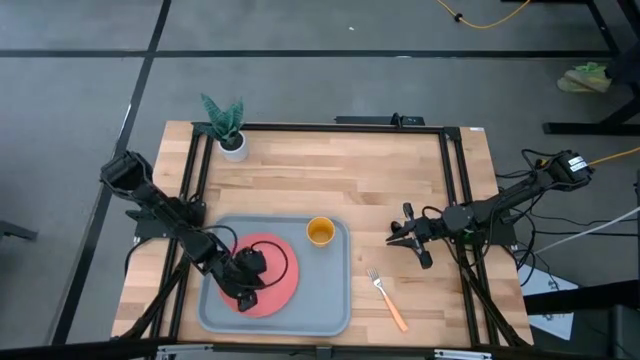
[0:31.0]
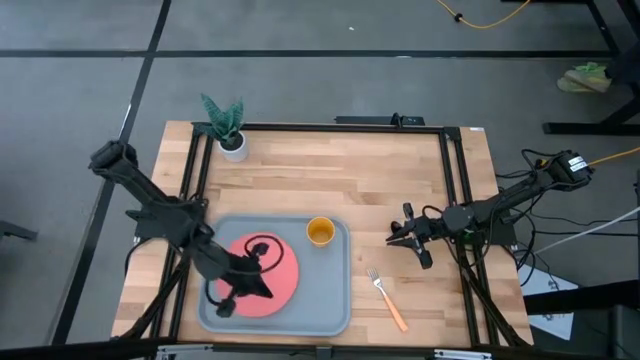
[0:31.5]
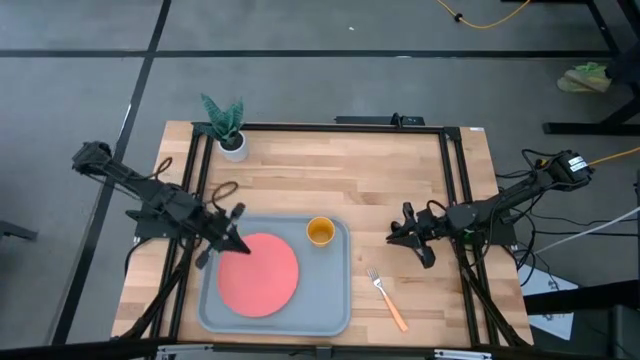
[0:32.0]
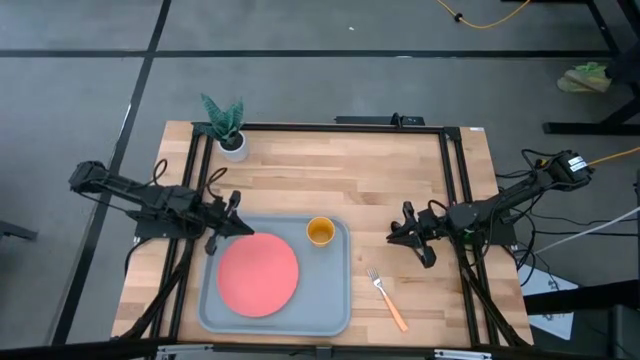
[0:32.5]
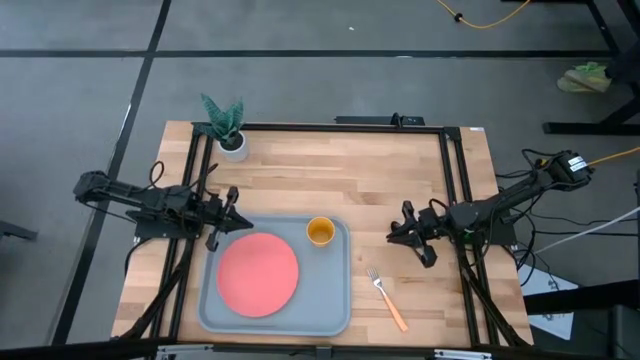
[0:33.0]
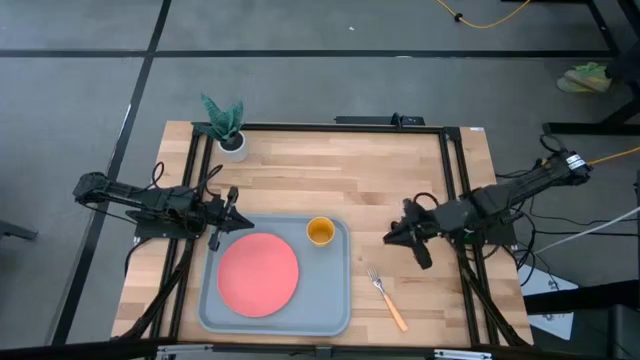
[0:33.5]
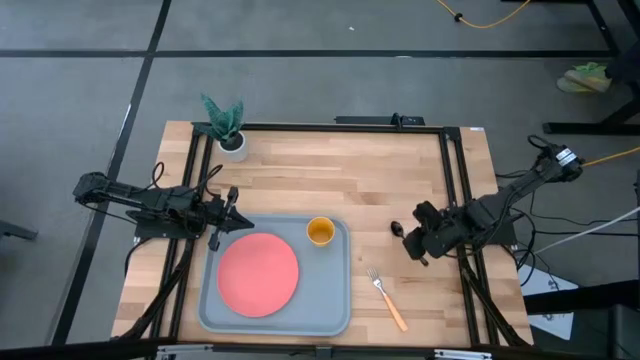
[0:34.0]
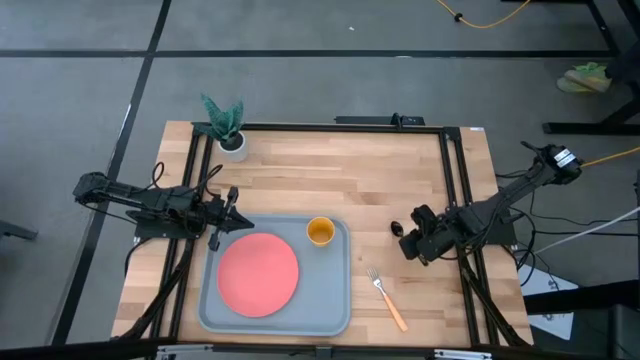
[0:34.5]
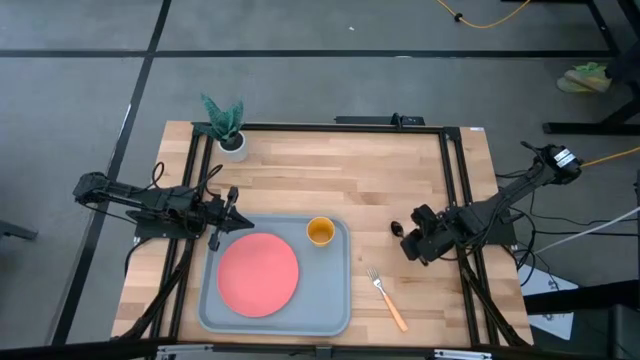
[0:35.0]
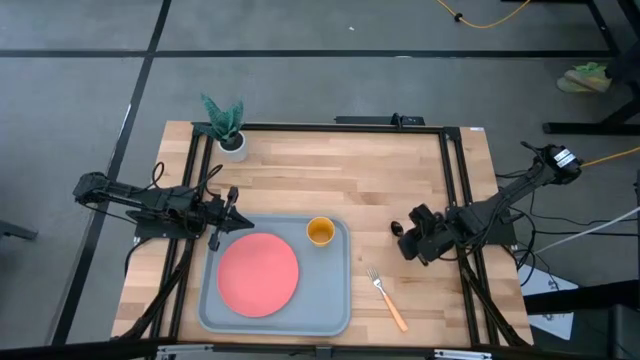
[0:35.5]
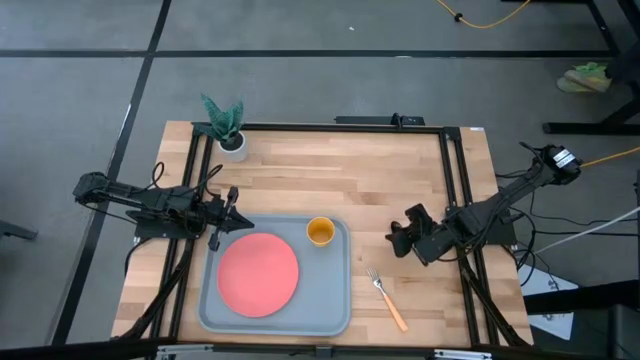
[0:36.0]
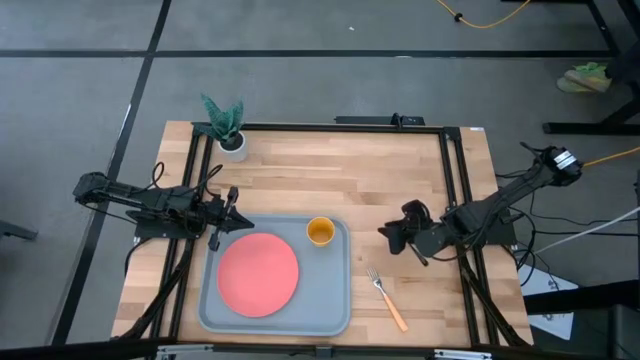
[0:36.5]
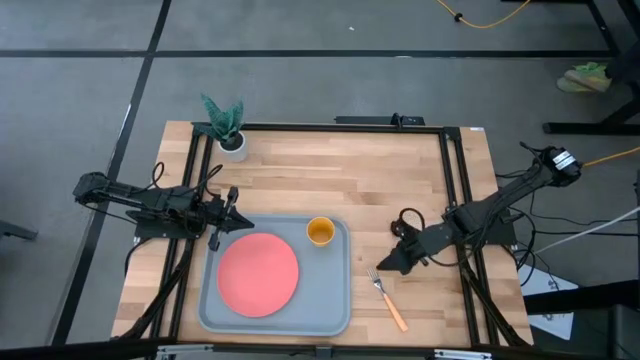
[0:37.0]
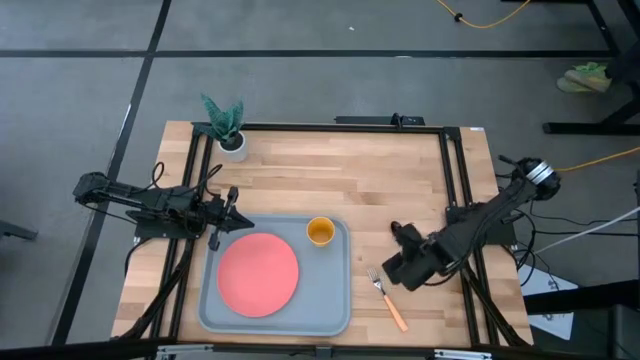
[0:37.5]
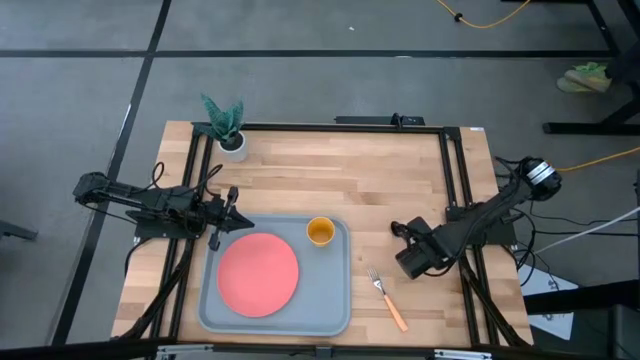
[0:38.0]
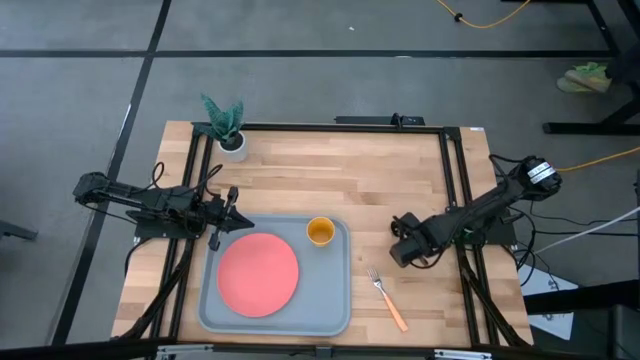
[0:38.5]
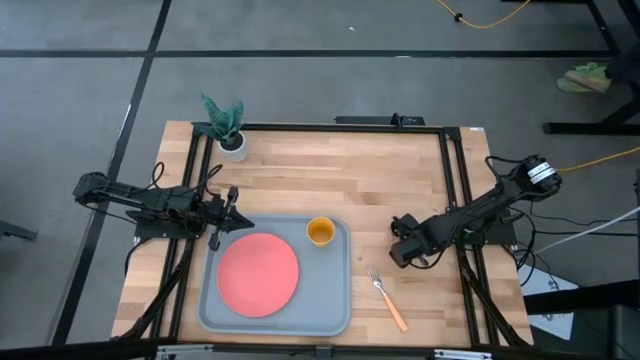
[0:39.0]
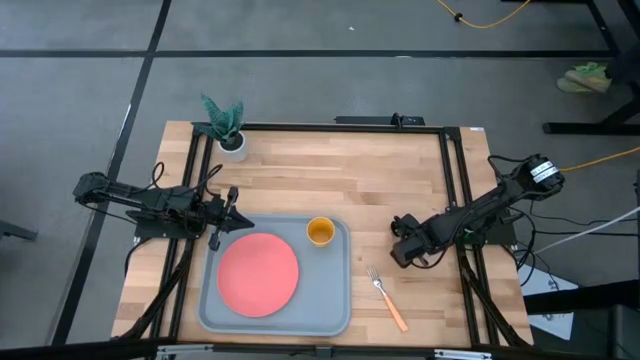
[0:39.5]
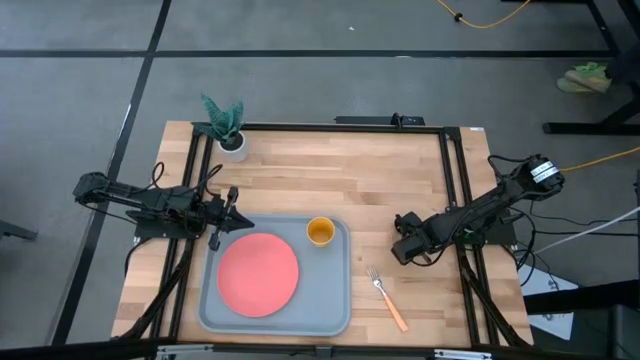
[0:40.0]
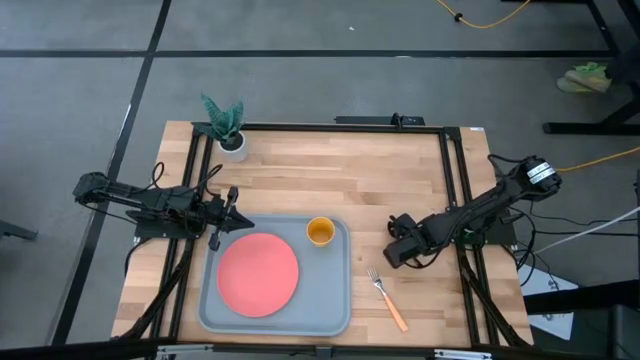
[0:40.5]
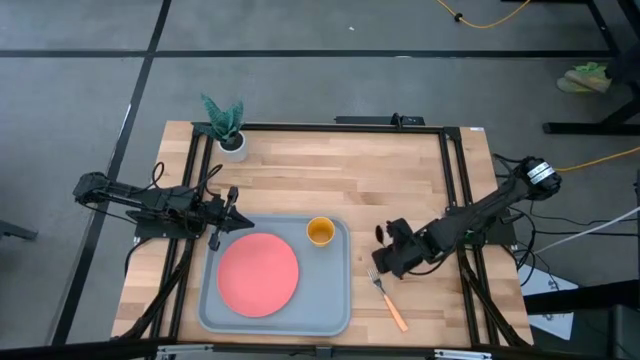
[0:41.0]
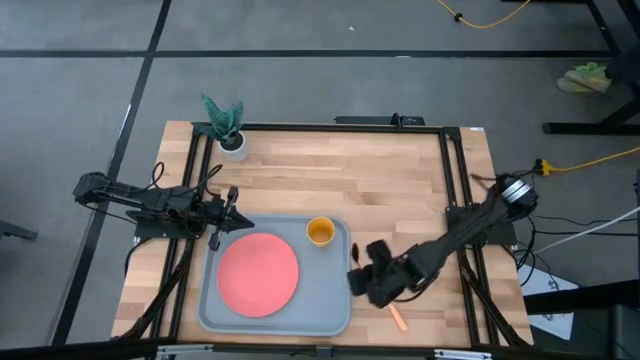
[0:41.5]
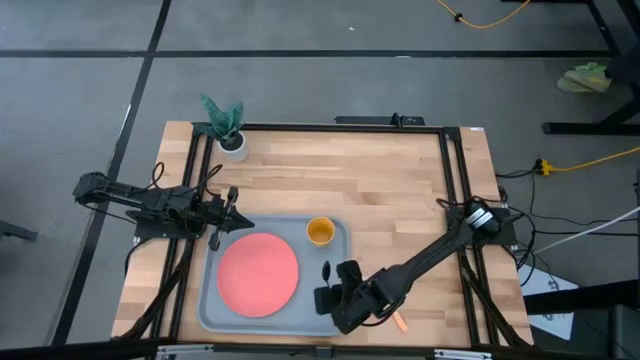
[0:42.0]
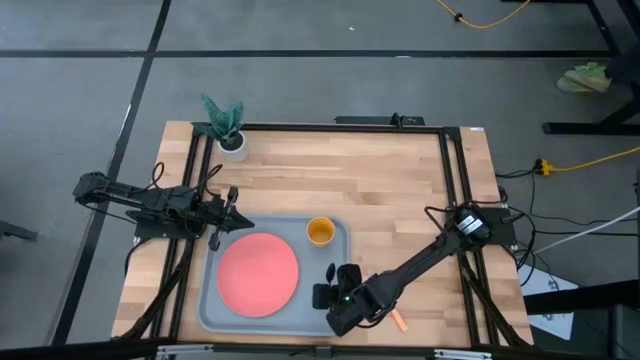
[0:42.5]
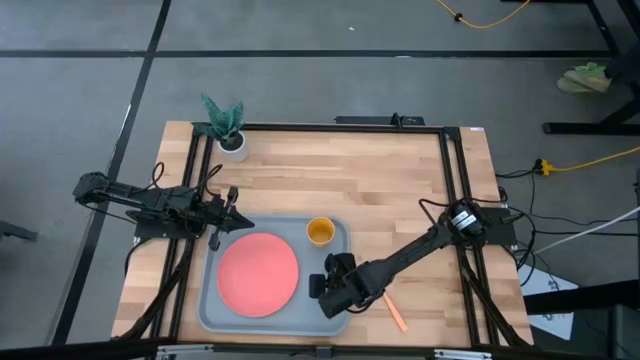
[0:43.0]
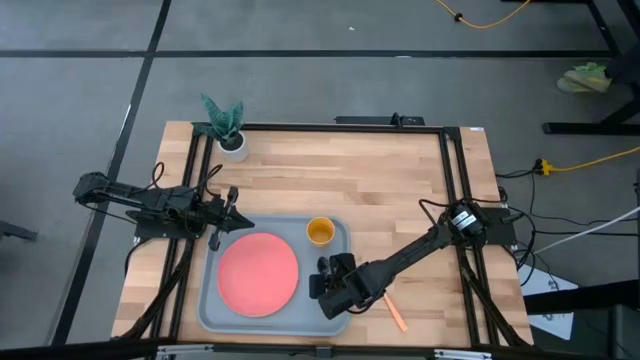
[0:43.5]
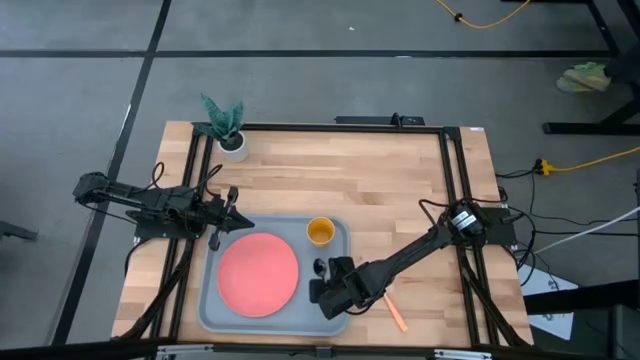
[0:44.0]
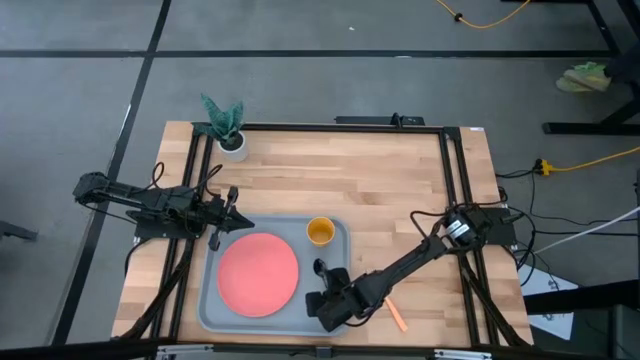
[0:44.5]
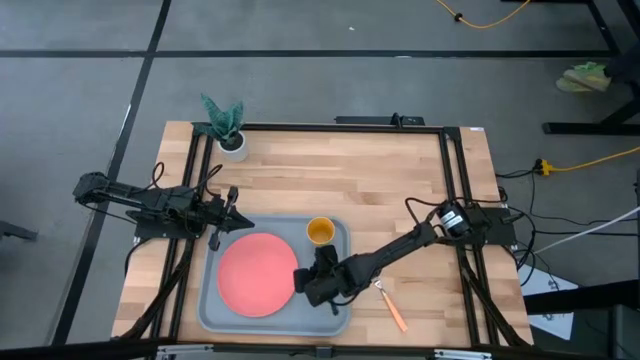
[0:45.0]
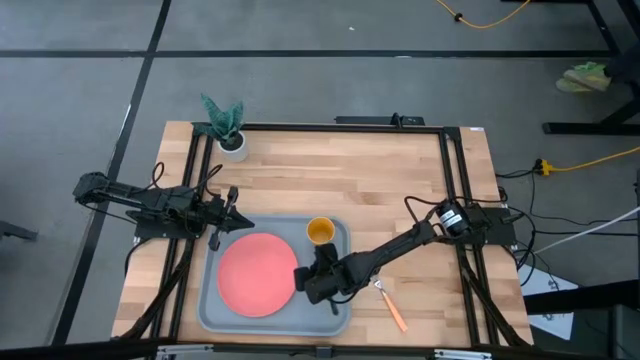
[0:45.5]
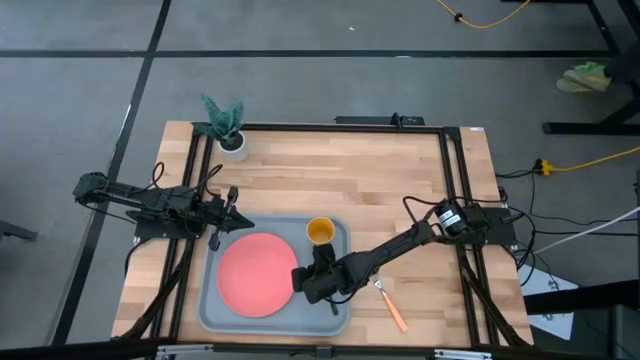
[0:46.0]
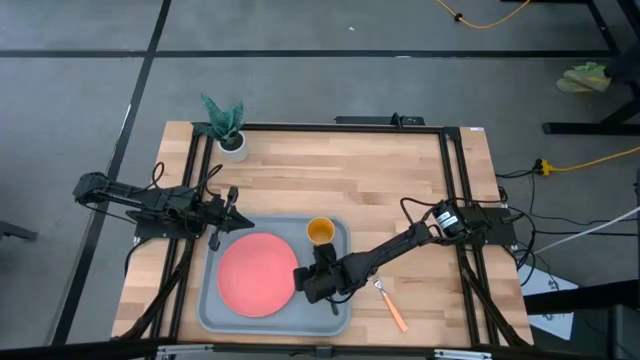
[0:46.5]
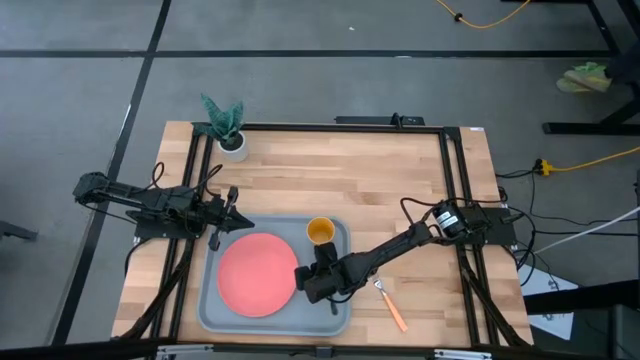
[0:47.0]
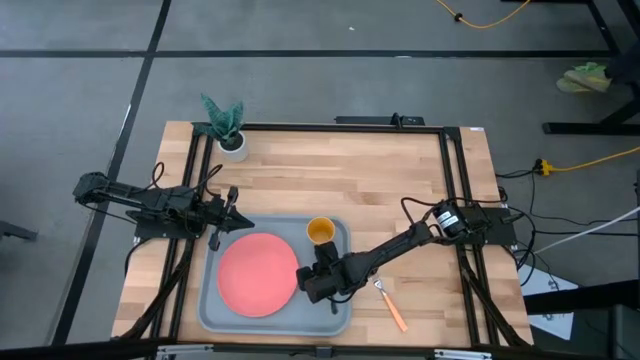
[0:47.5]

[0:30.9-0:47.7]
Task: Pick and place plate/cup/fork/spoon on tray
Put the black spoon on the gray tray
